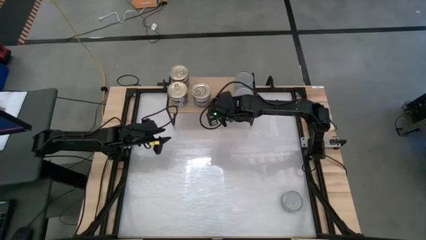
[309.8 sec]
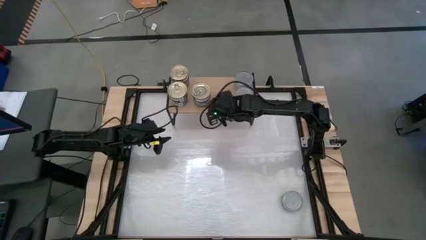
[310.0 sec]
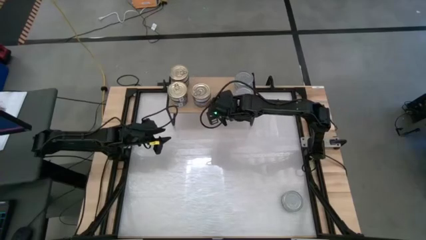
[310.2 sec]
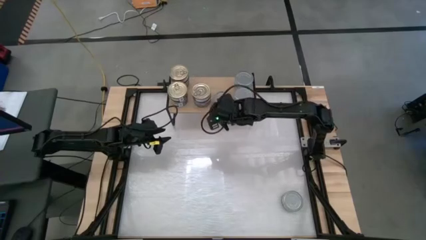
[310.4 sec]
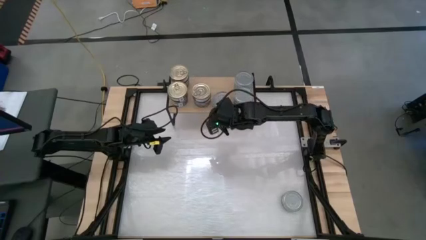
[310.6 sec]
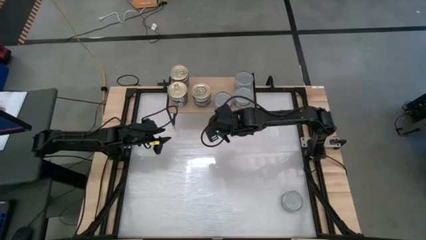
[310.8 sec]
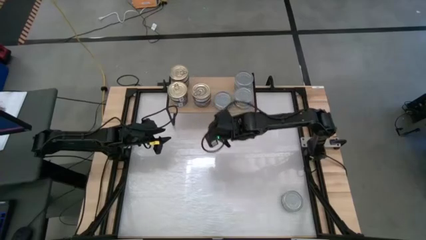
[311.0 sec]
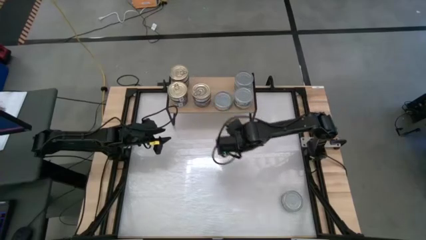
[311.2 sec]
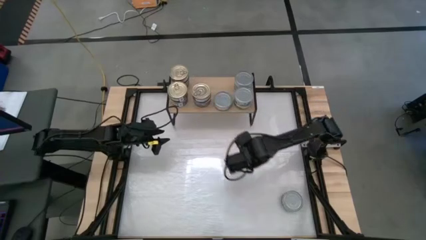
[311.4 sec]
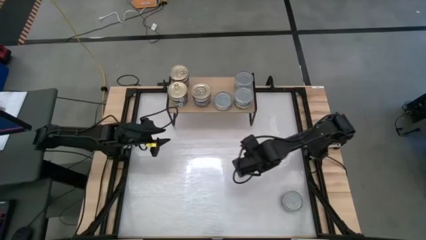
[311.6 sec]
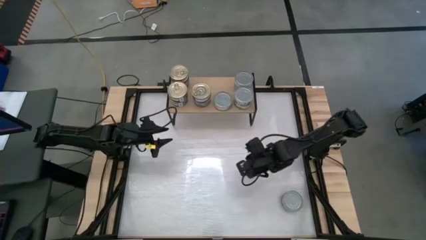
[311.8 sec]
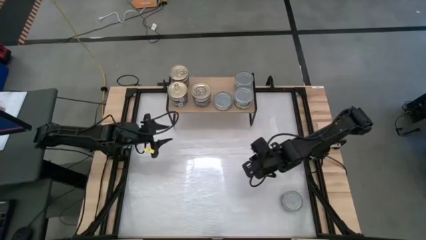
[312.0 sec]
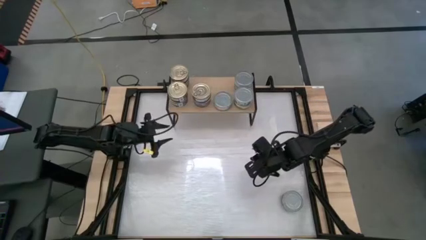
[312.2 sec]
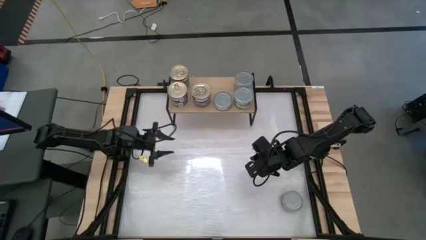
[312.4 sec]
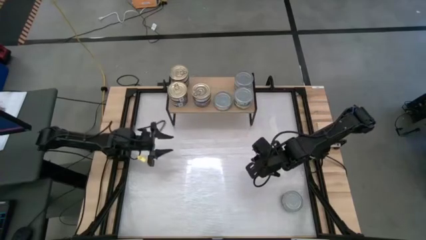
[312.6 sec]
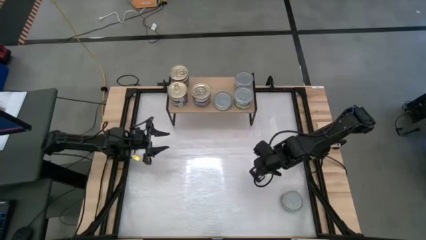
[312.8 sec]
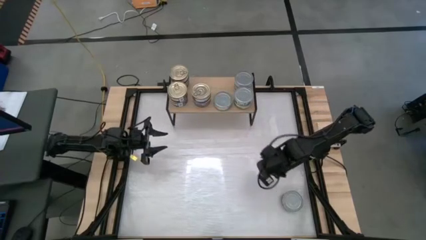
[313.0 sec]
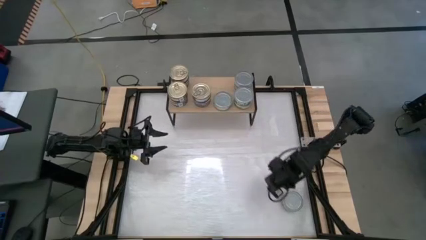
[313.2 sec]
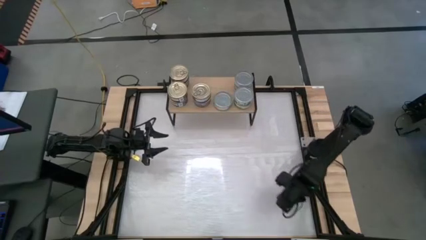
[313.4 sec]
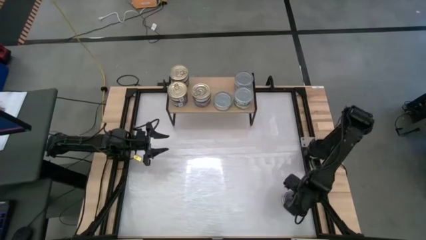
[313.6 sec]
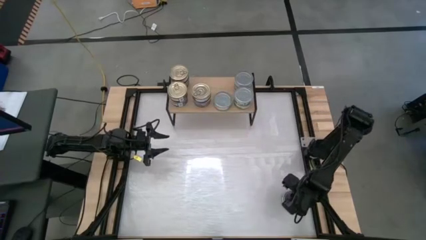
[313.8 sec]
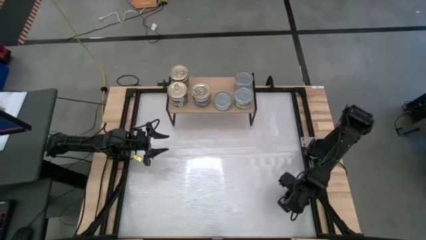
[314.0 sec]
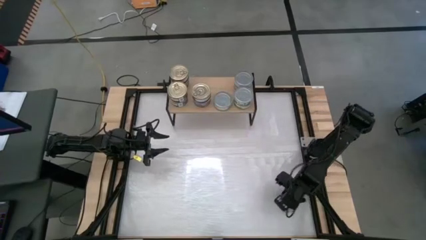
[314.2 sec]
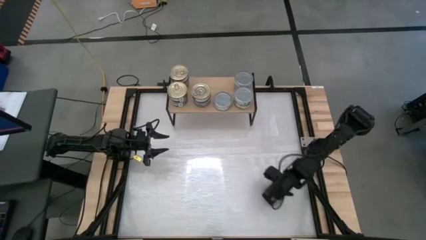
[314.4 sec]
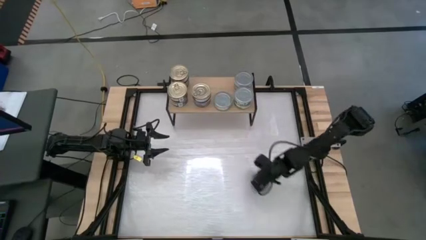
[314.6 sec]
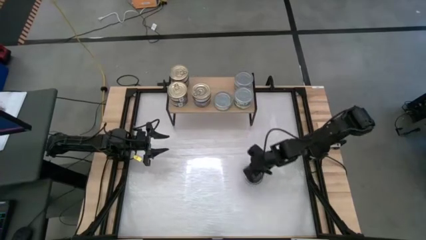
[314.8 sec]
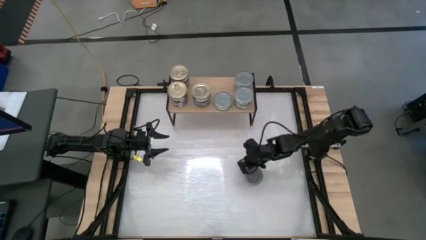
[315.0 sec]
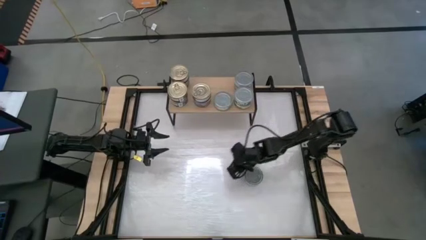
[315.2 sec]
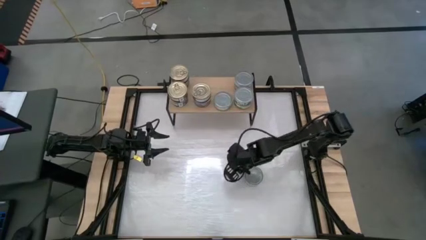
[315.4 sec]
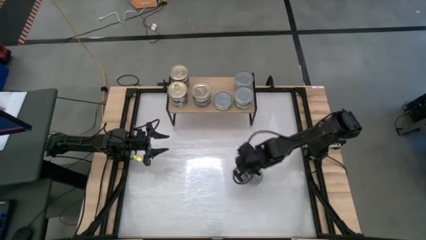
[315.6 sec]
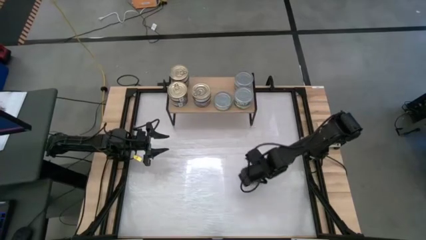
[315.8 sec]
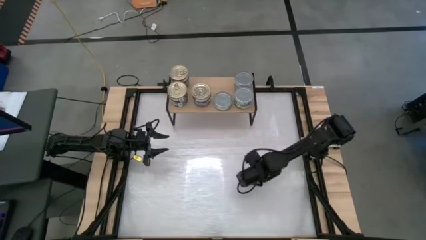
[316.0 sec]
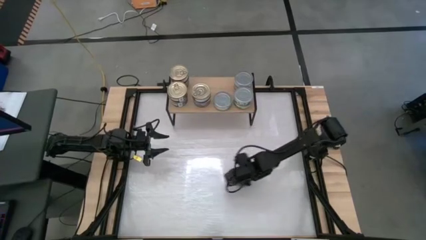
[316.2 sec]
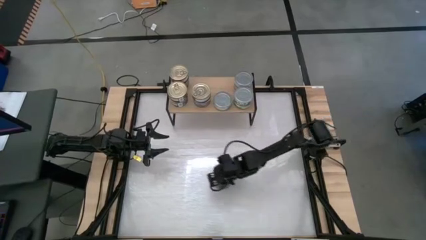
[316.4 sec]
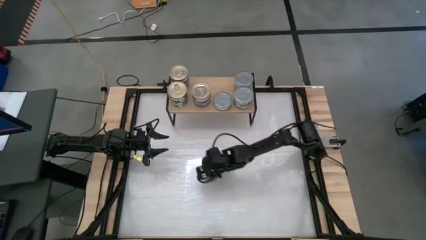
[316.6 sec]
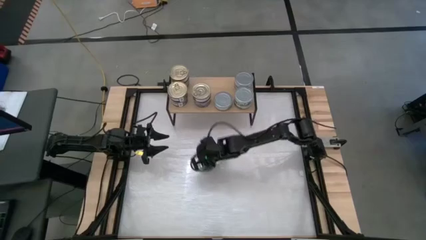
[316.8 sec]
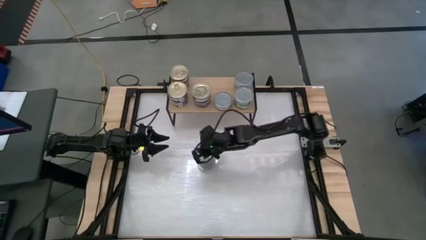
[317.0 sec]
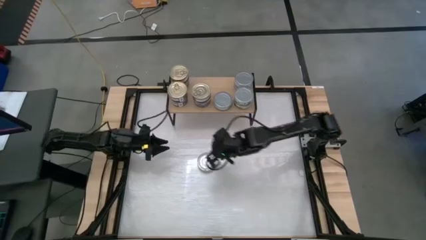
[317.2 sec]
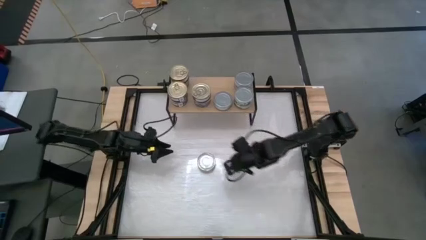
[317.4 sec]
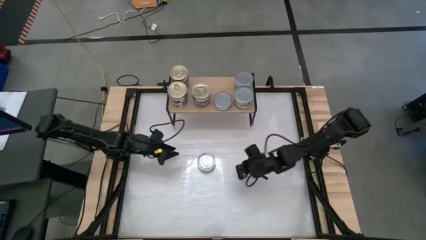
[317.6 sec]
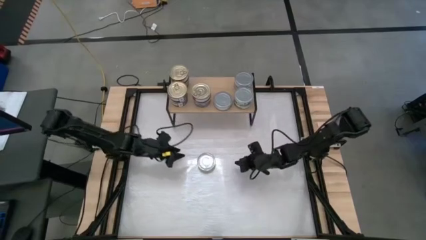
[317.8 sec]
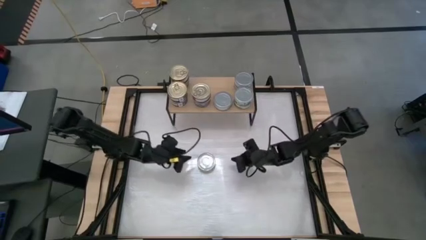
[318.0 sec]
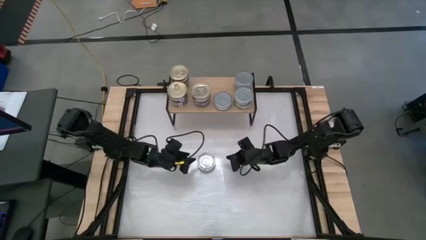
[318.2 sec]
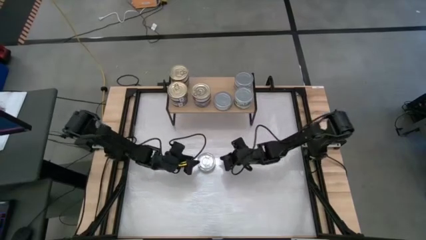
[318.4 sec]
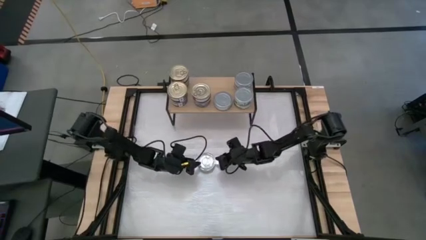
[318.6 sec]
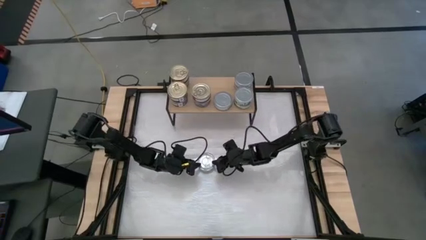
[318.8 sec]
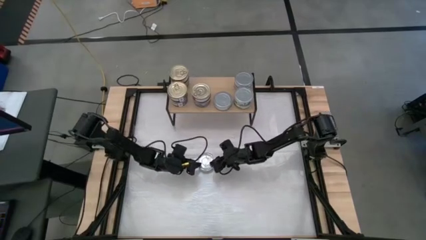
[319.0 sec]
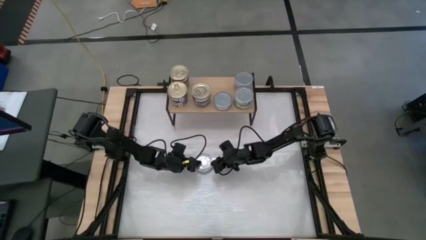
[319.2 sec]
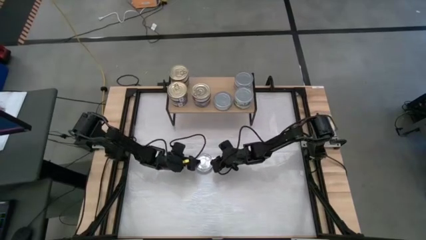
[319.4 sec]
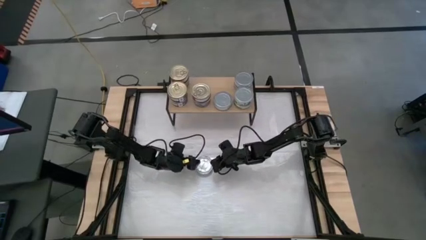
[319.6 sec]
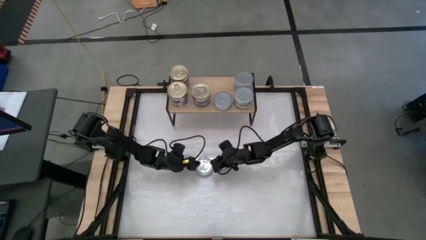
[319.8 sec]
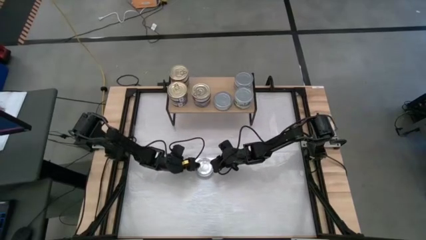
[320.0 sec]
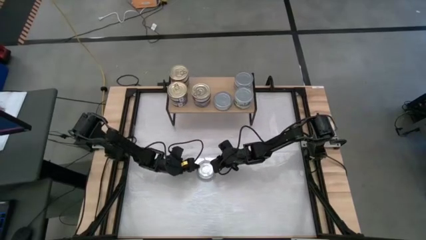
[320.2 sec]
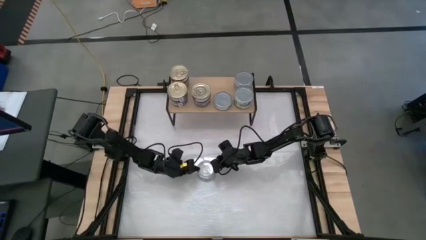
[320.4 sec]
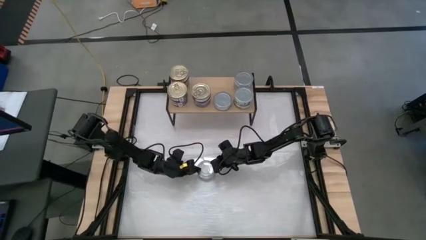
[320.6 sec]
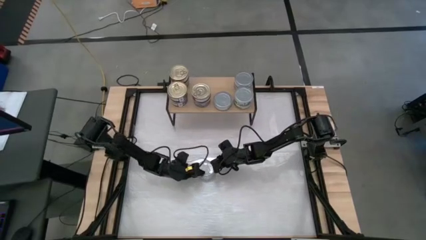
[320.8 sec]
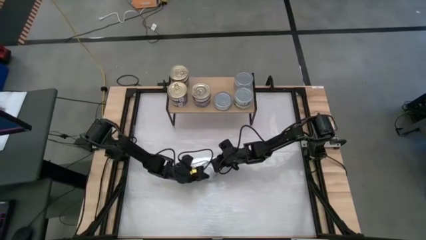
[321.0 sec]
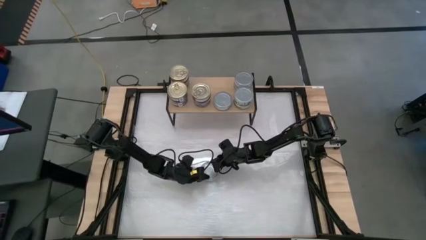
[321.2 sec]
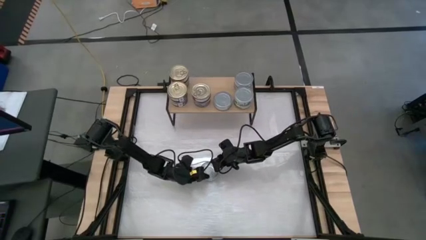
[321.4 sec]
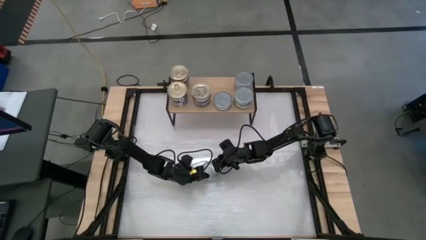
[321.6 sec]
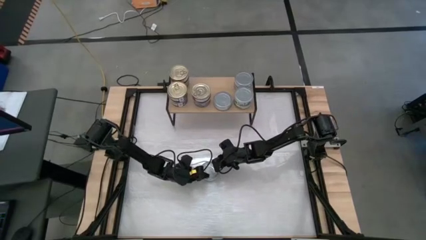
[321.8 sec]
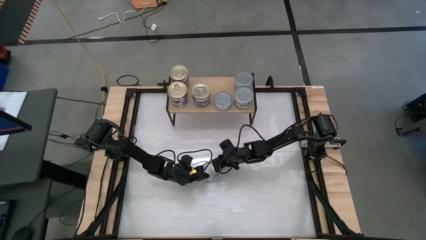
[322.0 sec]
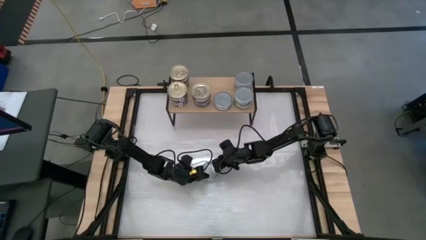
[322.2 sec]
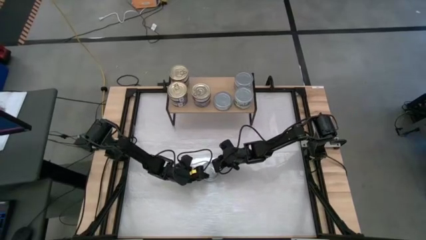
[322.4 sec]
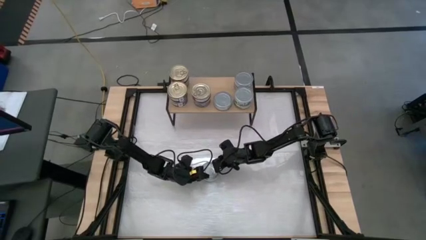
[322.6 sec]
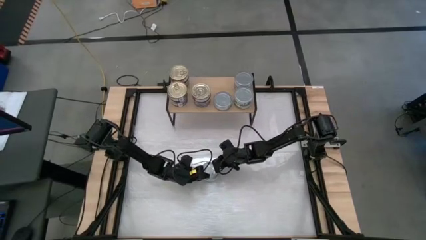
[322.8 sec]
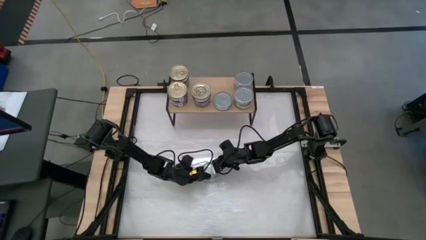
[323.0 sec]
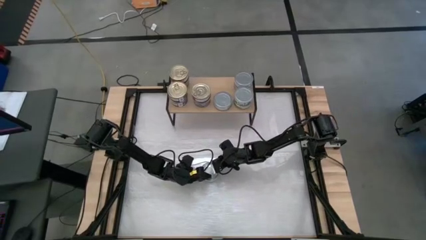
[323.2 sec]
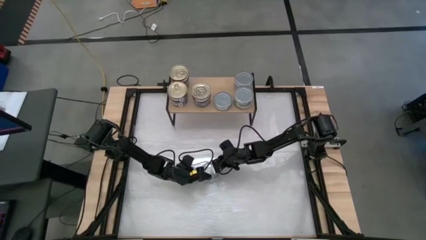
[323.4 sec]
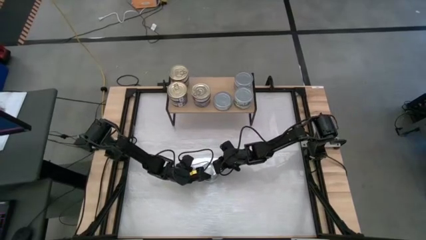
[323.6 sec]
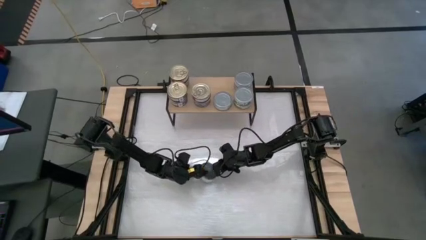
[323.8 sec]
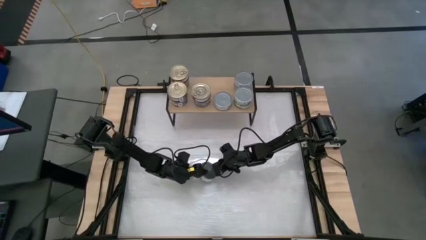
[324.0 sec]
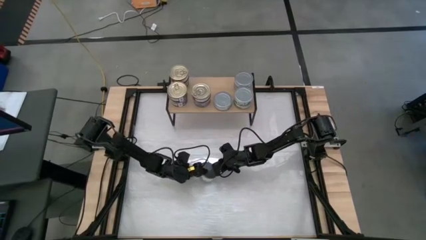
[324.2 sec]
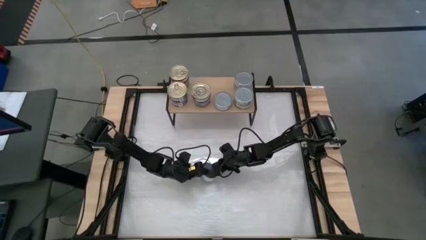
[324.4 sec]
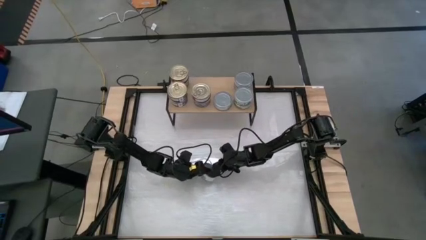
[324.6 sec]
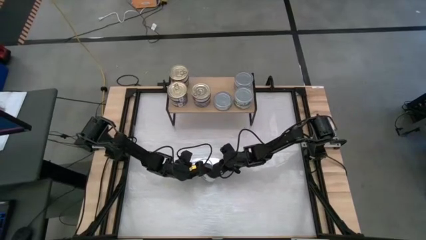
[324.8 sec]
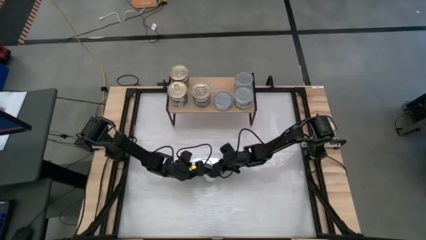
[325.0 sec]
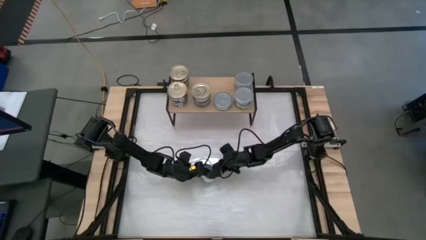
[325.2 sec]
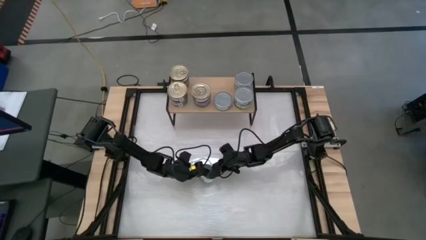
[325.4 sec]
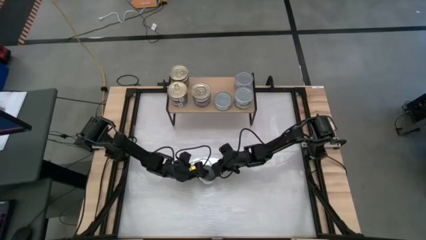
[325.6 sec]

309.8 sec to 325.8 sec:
Task: Stack canned seafood by type on shelf
Stack the green white tuna can on top of the other green white tuna can on the shelf

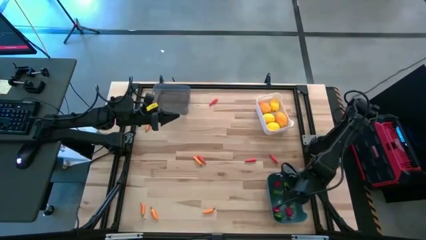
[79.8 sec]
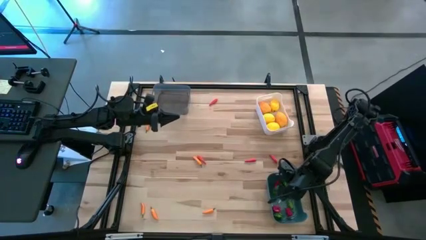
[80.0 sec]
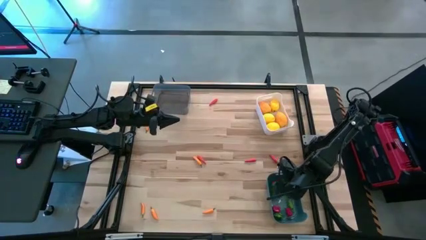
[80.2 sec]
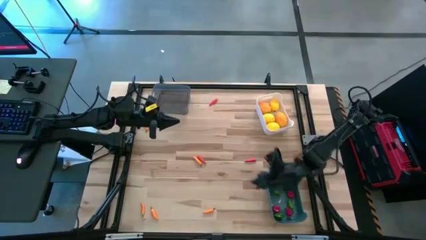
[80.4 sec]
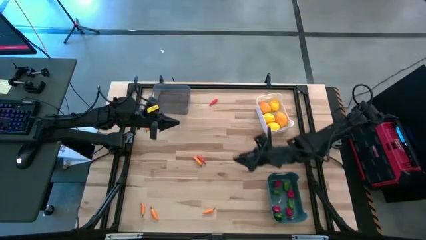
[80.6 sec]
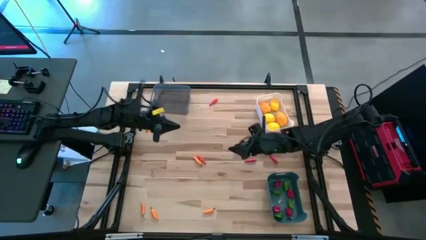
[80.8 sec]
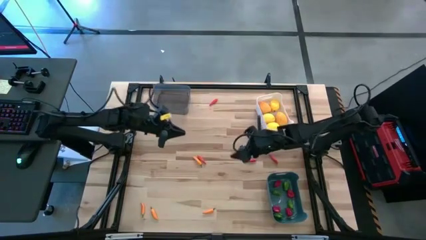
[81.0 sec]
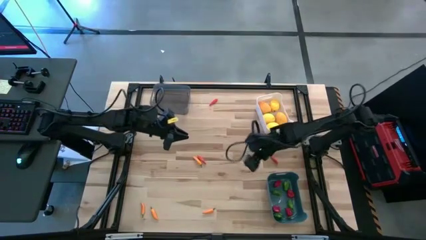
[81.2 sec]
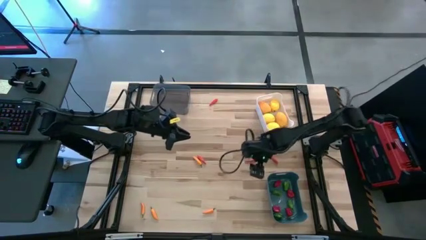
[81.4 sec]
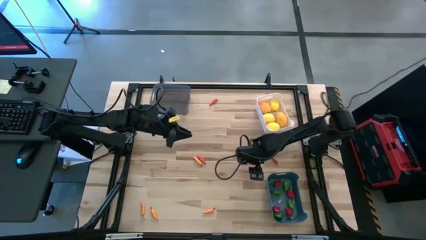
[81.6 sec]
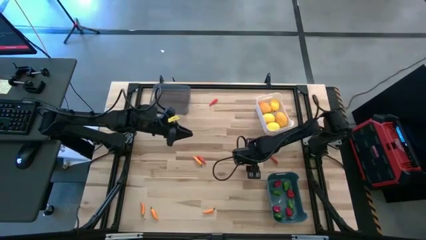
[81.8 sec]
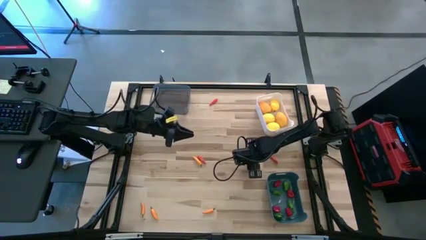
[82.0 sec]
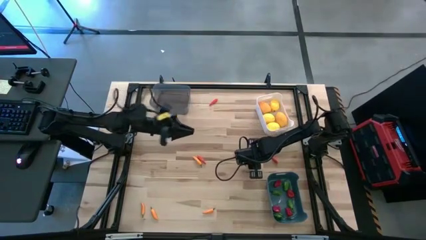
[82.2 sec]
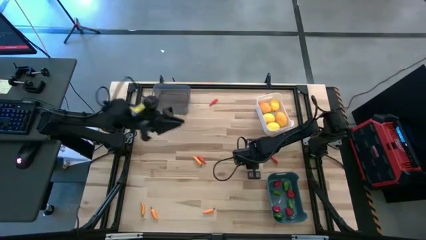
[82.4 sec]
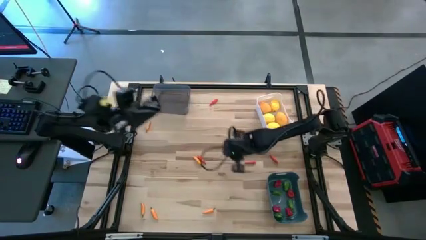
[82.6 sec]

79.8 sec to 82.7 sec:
Task: Sort produce into baskets
Put the orange chili pepper into the black bin
